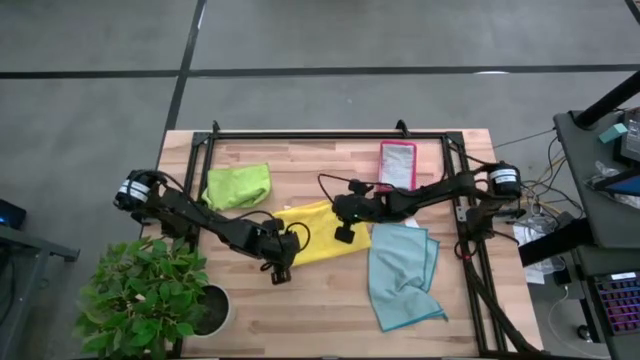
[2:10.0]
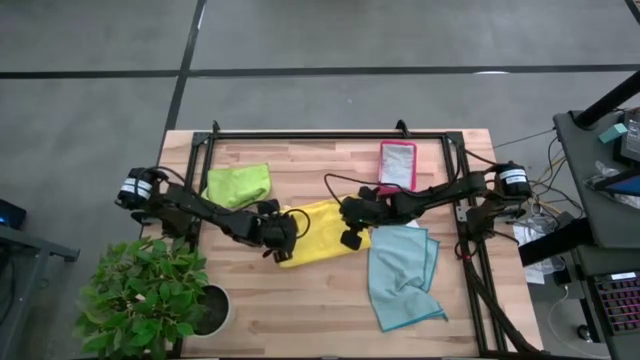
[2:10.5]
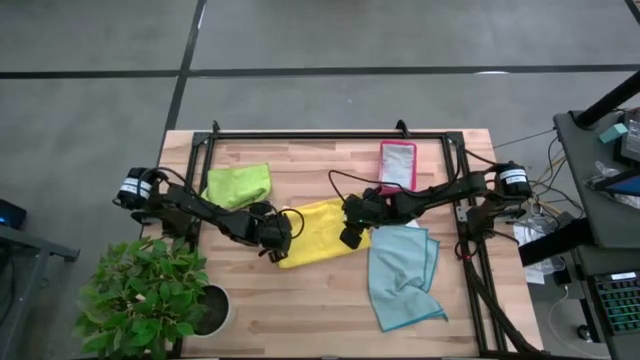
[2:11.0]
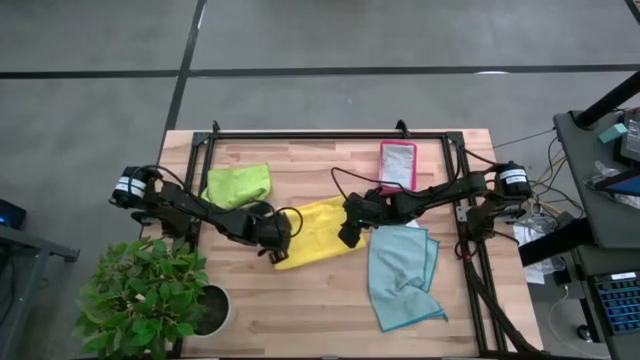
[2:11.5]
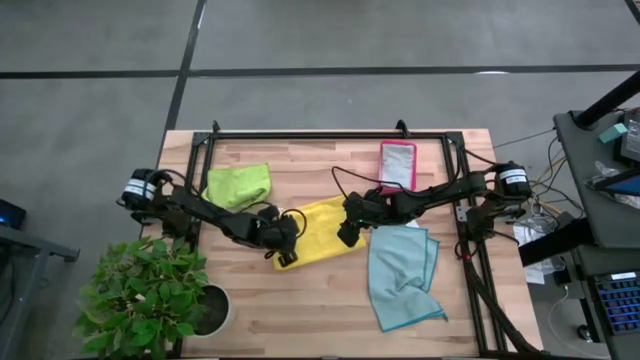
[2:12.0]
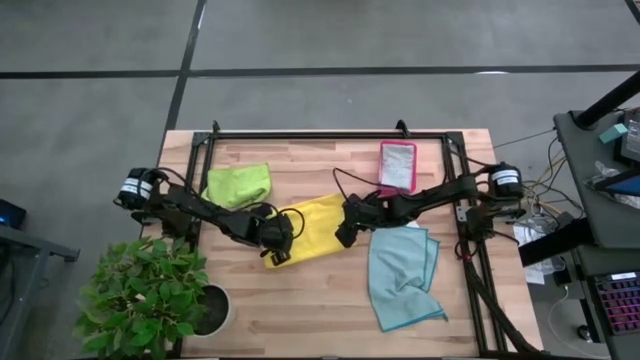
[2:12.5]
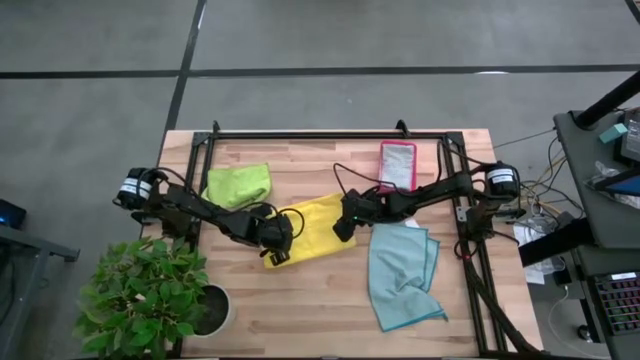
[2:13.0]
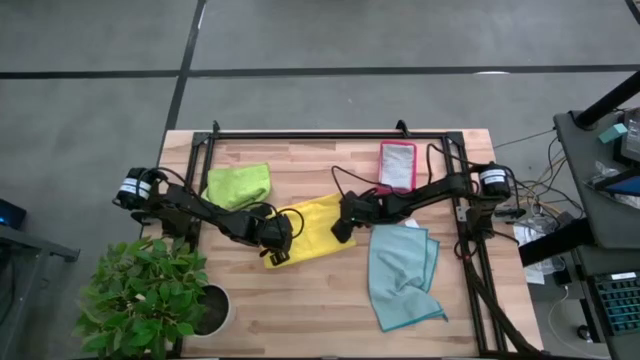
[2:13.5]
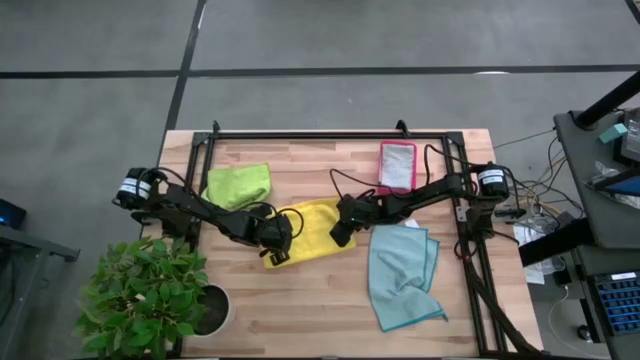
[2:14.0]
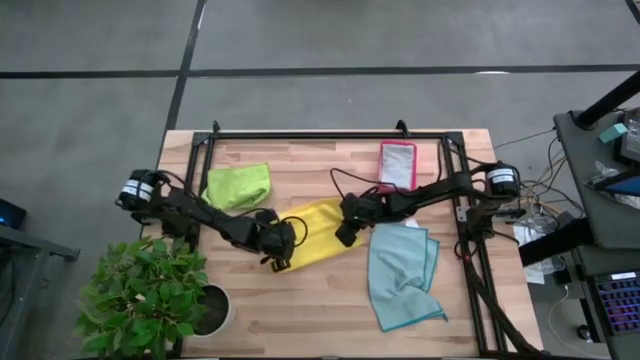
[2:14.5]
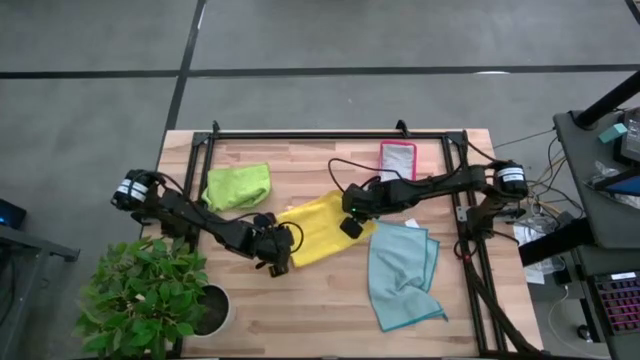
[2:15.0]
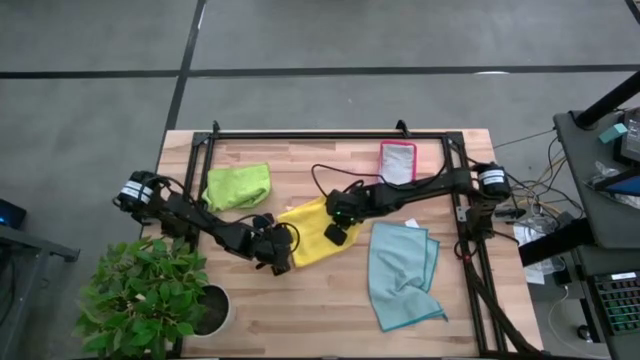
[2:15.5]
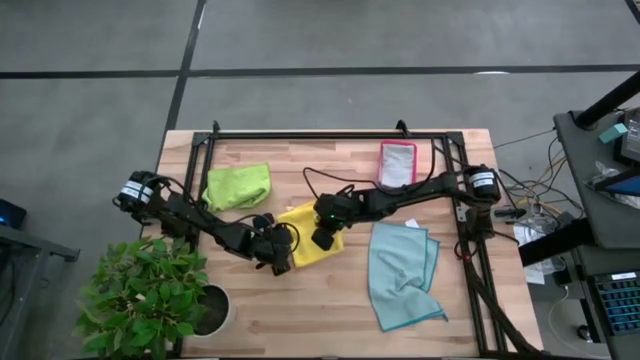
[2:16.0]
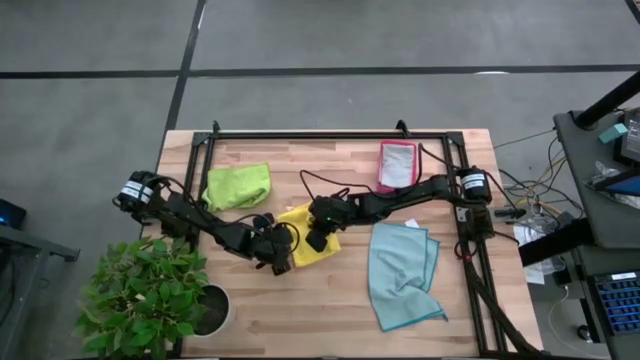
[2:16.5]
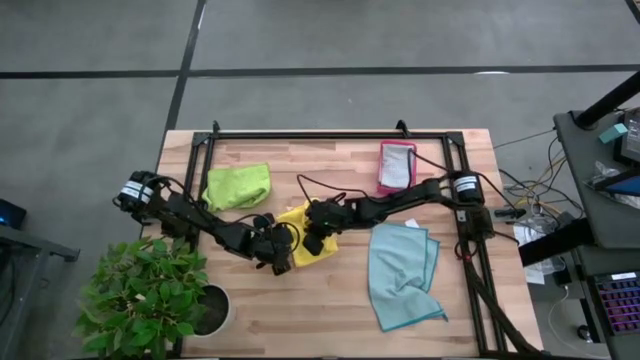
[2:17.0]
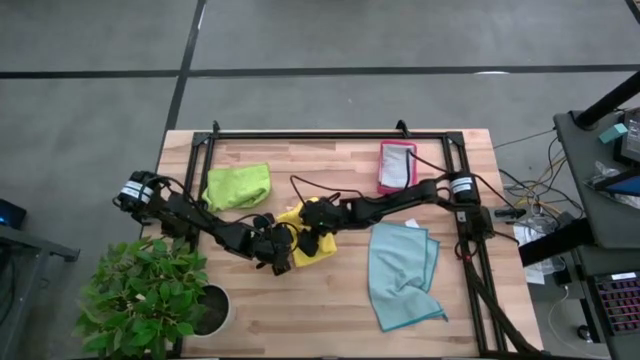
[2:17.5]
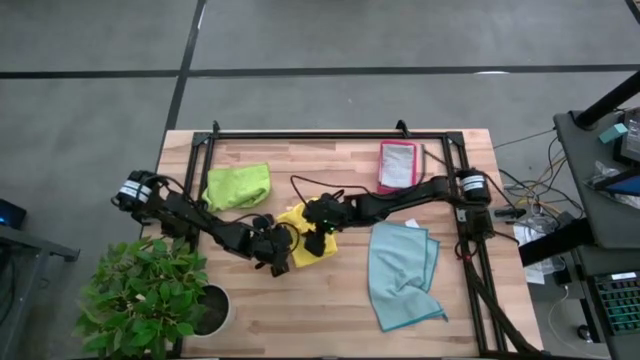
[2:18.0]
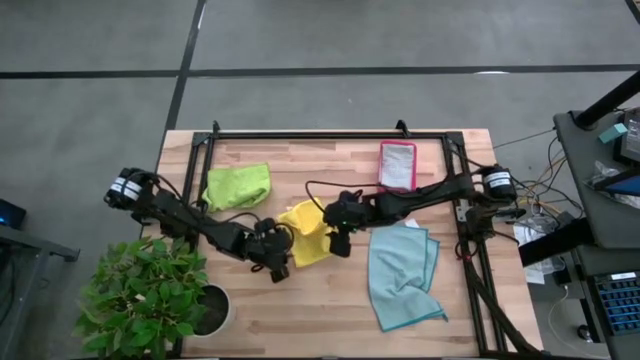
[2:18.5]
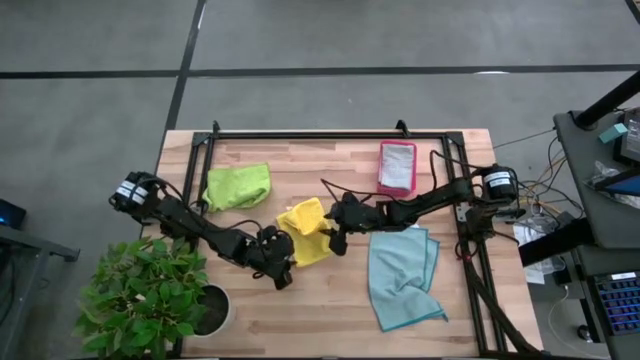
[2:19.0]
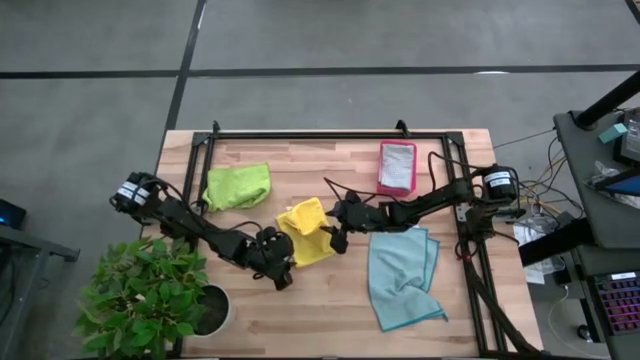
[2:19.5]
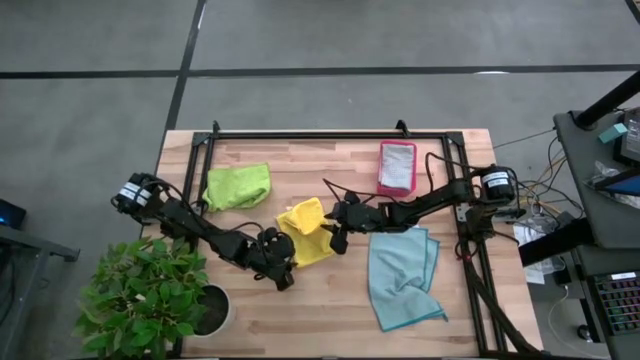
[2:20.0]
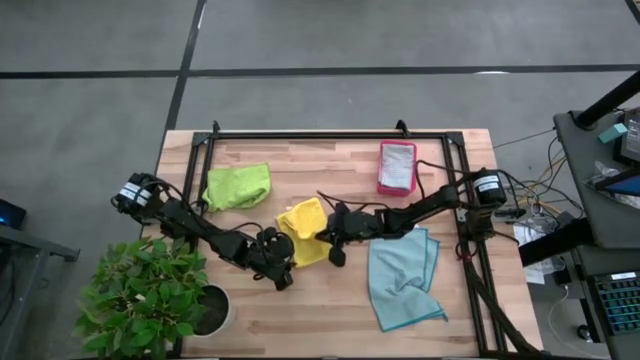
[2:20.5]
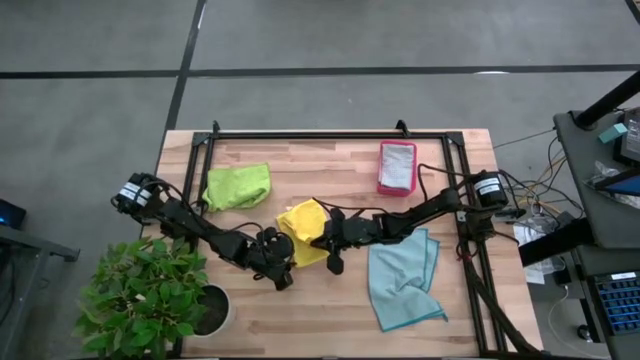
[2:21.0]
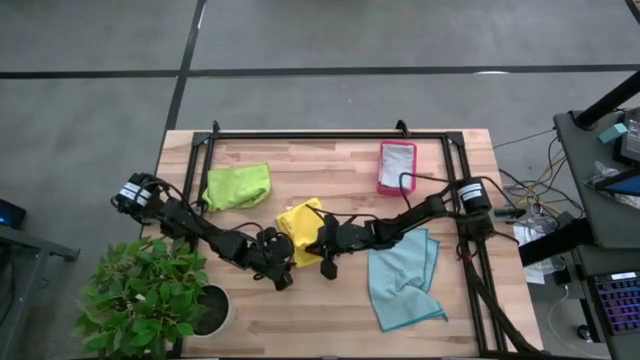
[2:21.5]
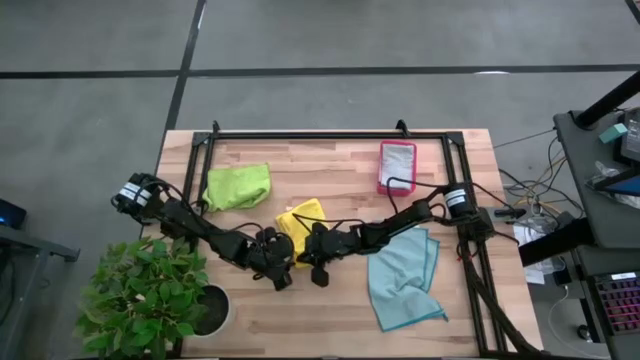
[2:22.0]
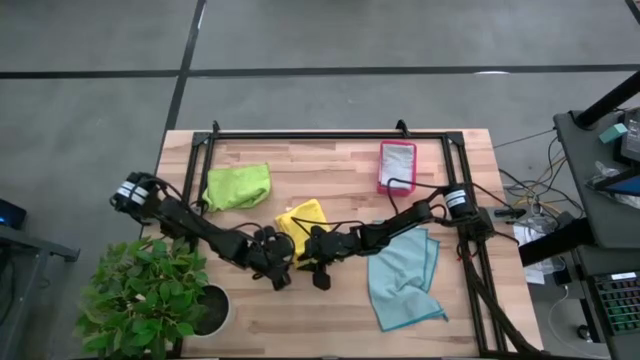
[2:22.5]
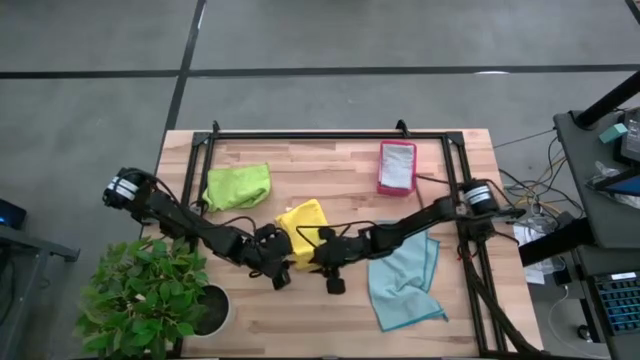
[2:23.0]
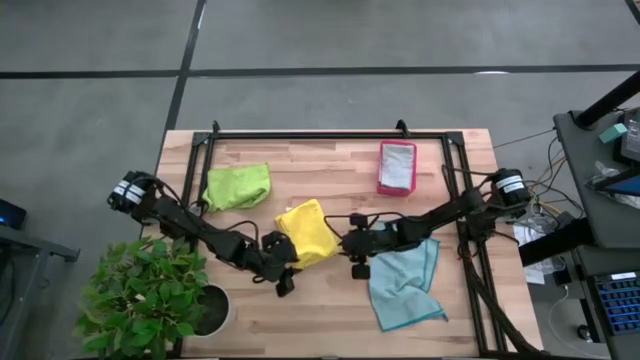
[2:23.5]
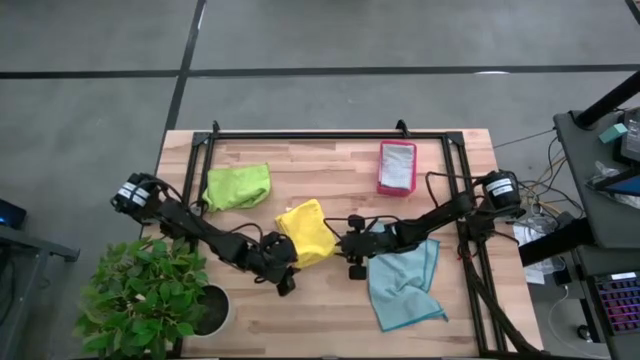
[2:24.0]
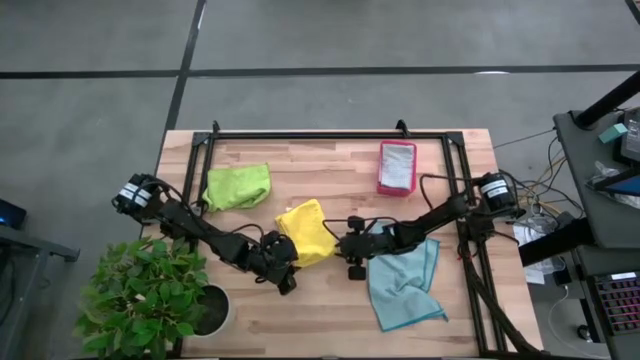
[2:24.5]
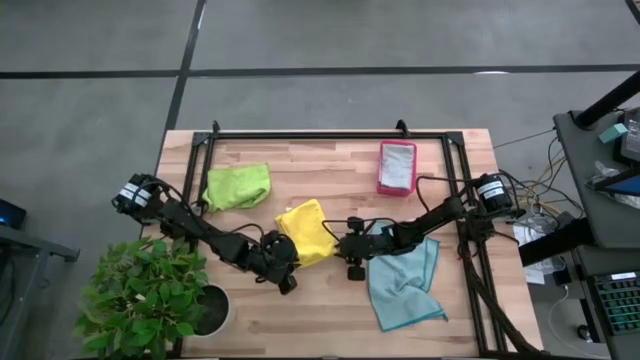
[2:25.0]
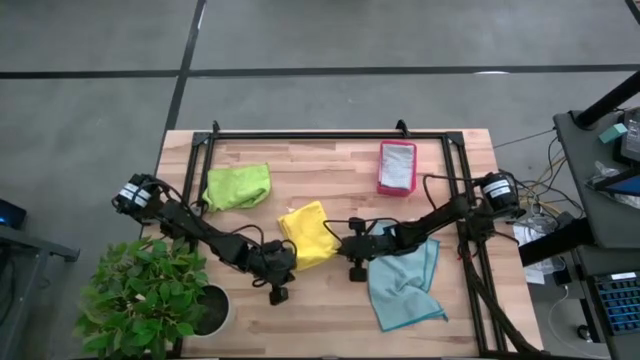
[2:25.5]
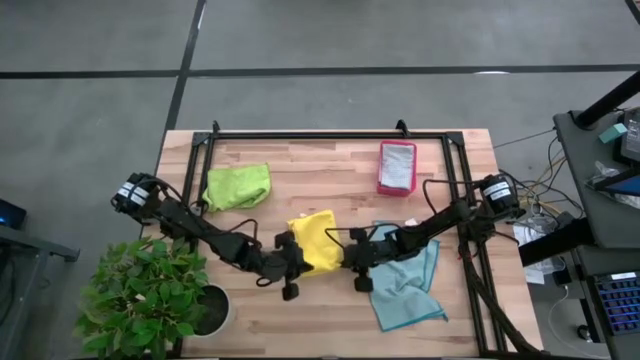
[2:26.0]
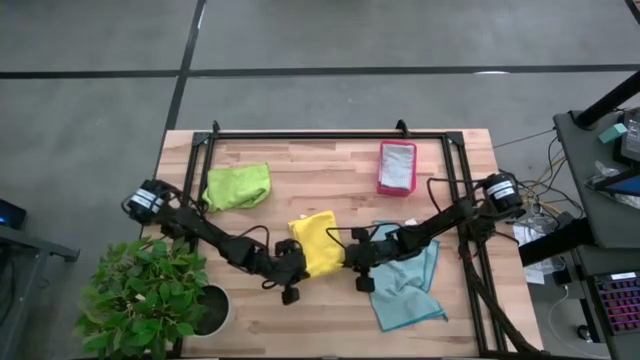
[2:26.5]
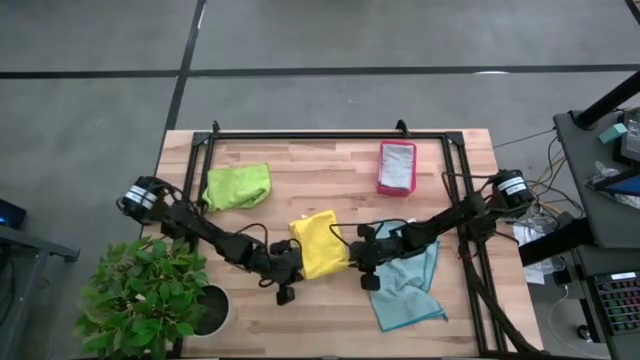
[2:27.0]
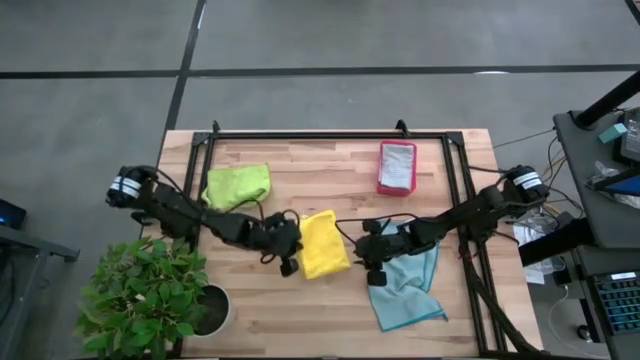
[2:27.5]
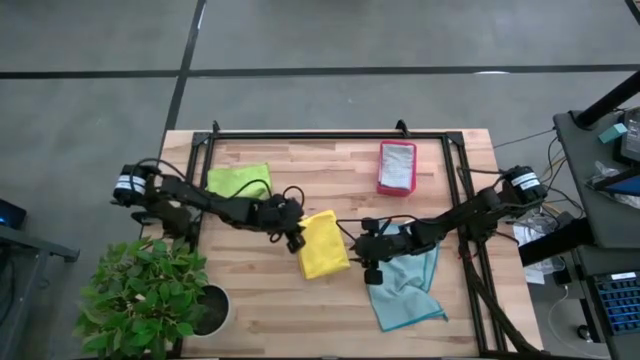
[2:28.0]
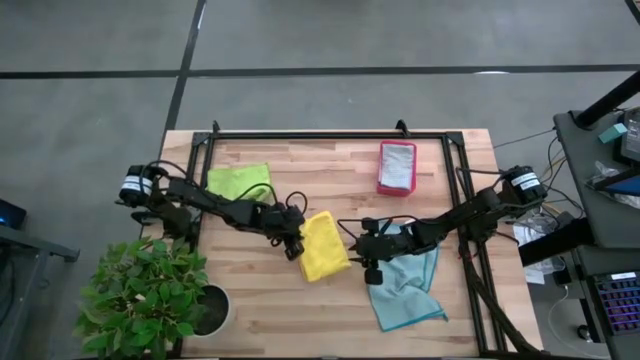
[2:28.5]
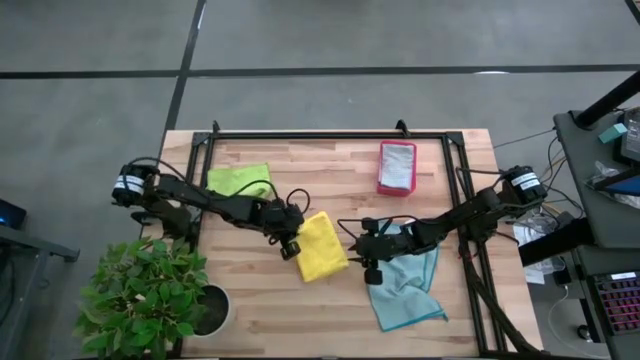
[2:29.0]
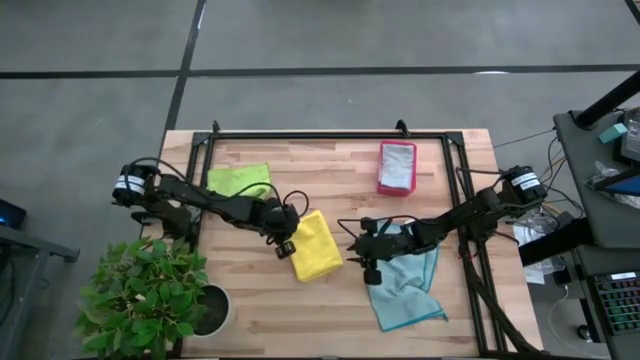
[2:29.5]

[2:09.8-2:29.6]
Task: Fold microfiber towels
Fold the yellow microfiber towel

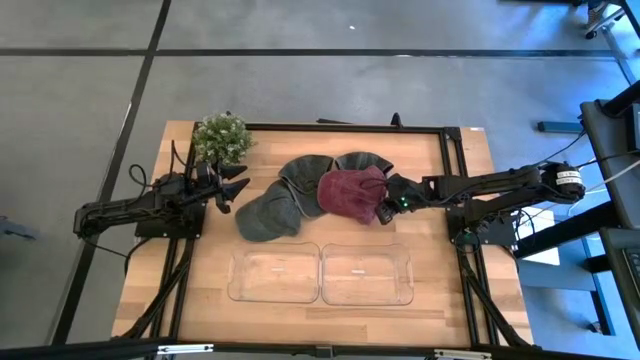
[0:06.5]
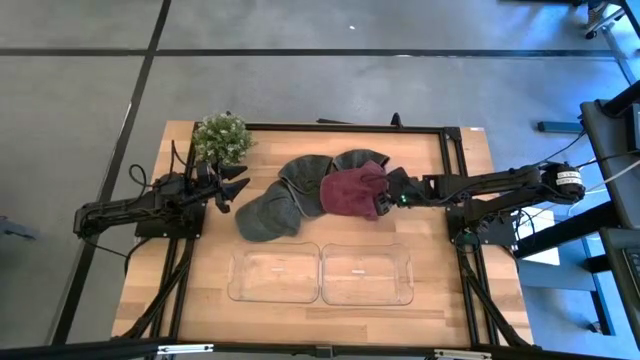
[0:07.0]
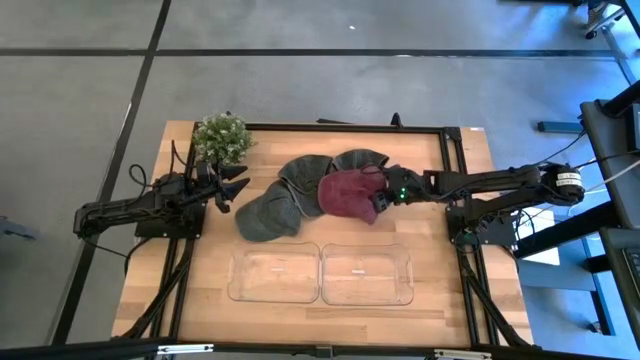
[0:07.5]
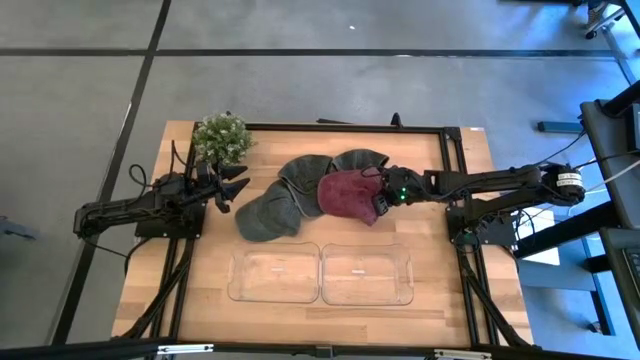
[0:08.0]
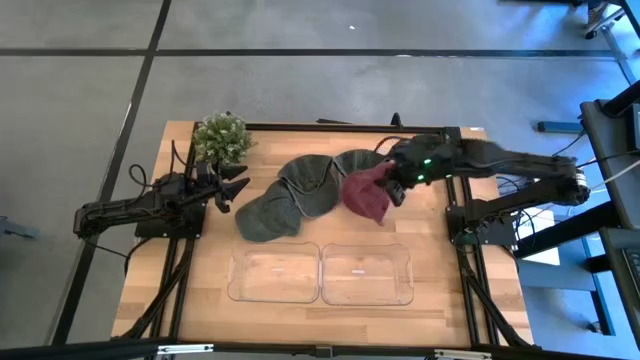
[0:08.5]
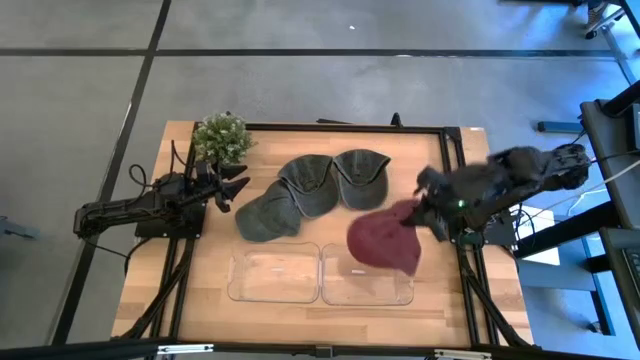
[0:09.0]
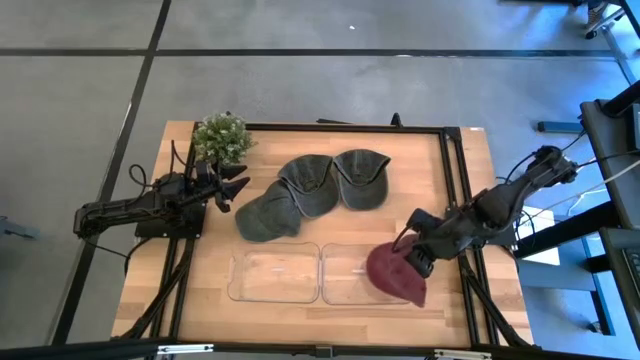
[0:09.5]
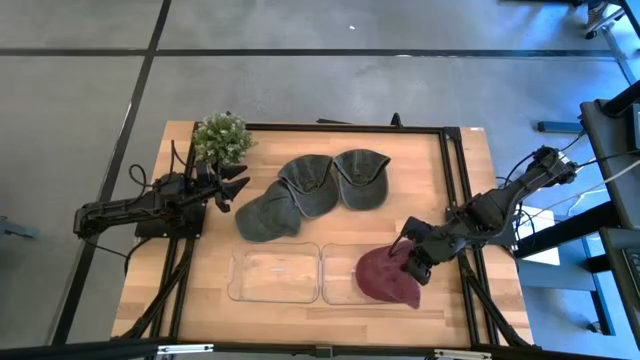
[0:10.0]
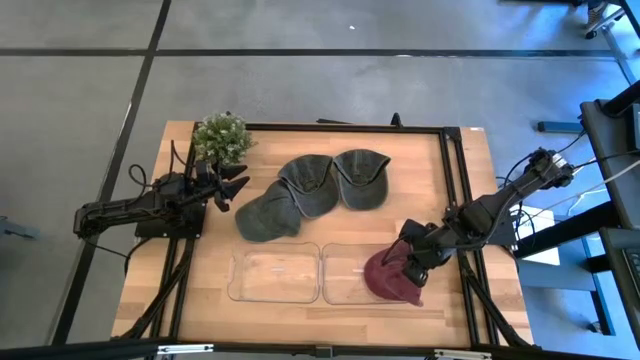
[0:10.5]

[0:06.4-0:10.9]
Task: Pick & Place hat
Put the red cap into the right transparent bin
